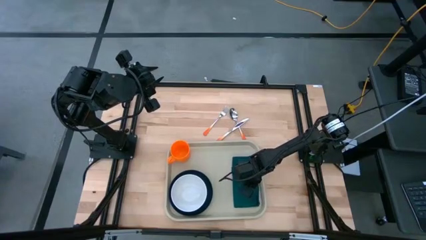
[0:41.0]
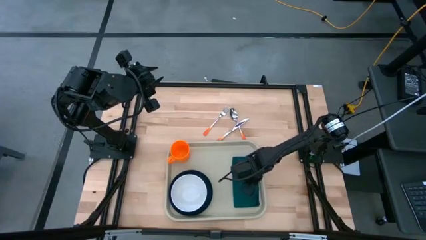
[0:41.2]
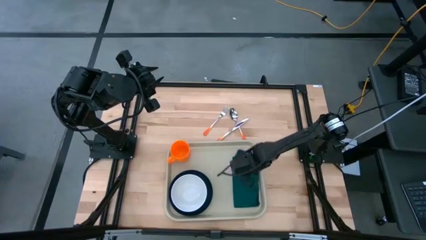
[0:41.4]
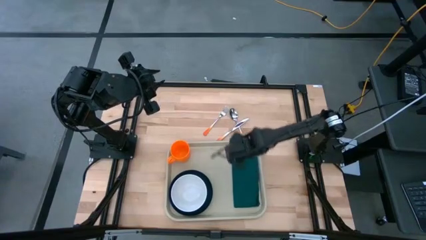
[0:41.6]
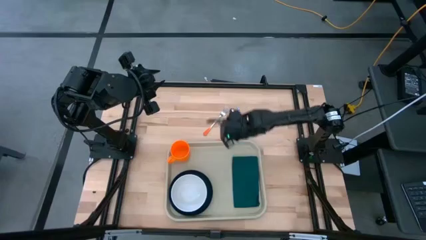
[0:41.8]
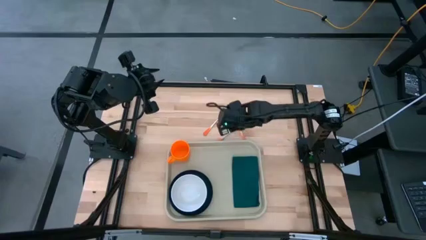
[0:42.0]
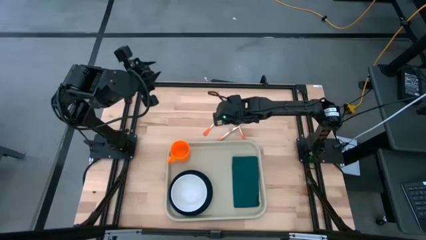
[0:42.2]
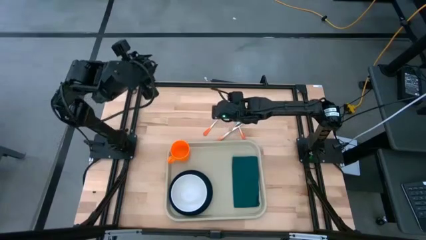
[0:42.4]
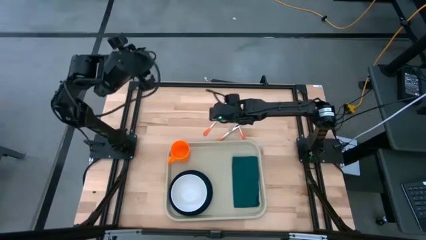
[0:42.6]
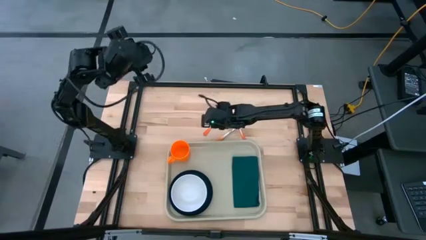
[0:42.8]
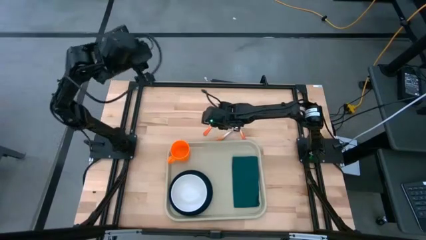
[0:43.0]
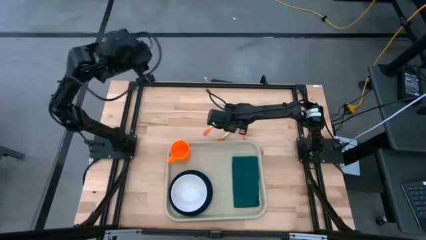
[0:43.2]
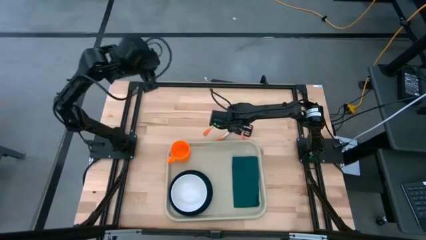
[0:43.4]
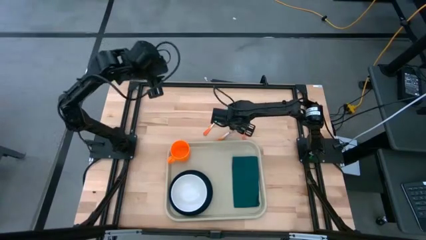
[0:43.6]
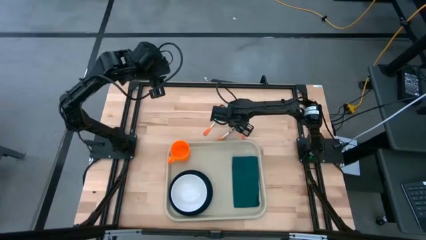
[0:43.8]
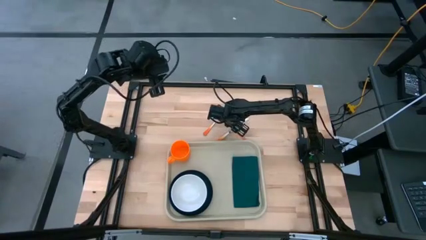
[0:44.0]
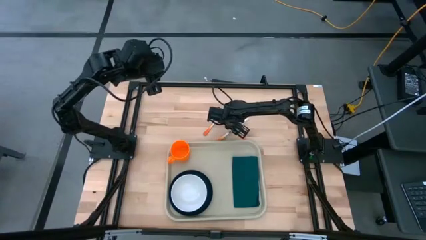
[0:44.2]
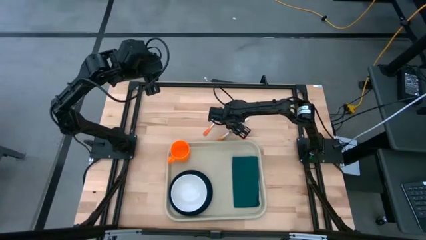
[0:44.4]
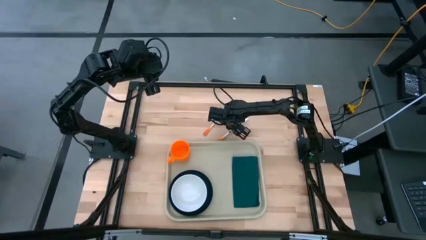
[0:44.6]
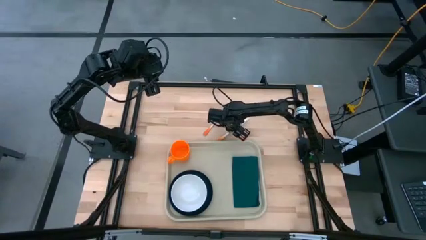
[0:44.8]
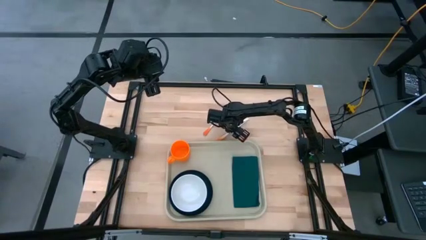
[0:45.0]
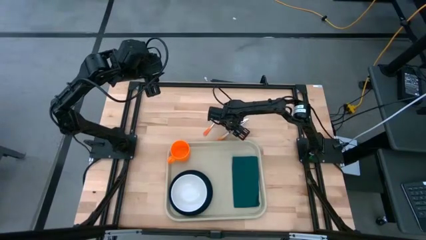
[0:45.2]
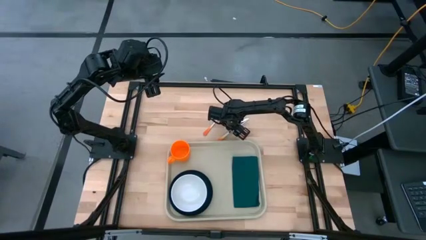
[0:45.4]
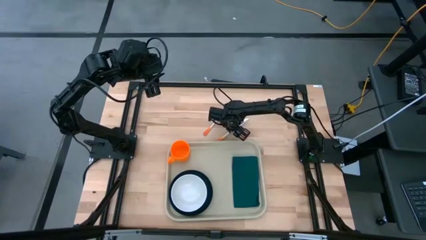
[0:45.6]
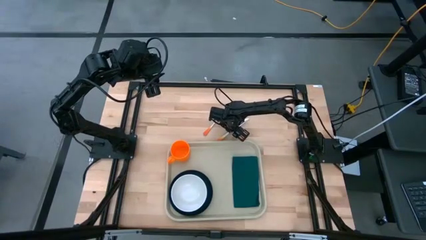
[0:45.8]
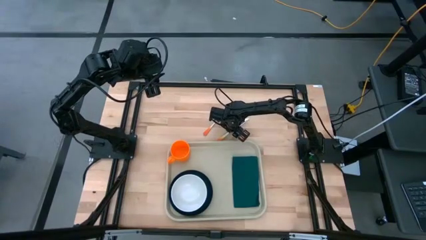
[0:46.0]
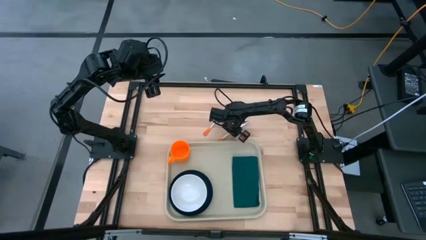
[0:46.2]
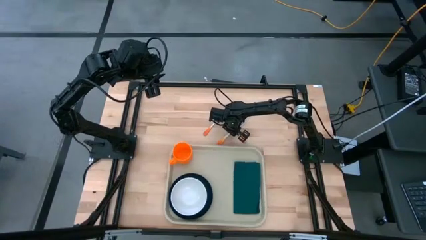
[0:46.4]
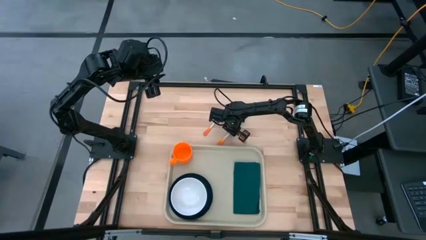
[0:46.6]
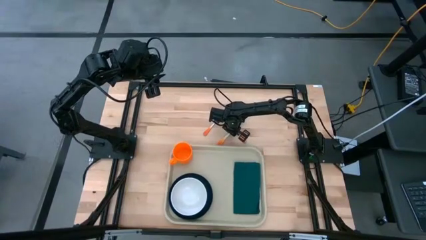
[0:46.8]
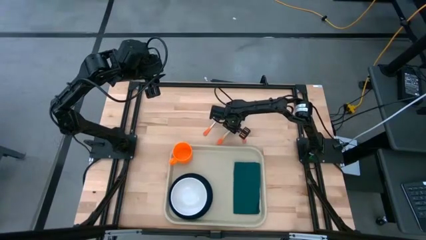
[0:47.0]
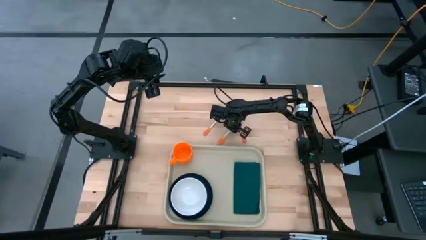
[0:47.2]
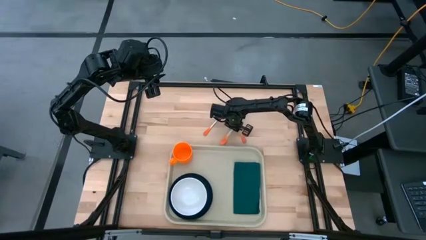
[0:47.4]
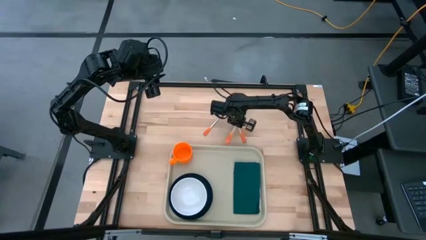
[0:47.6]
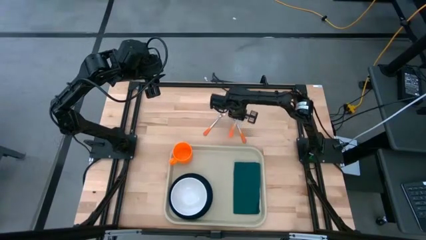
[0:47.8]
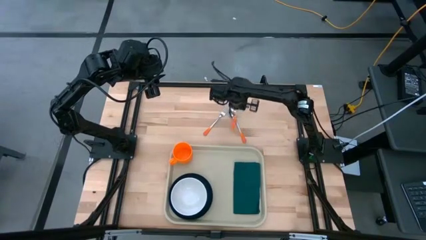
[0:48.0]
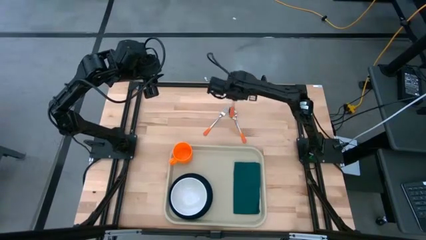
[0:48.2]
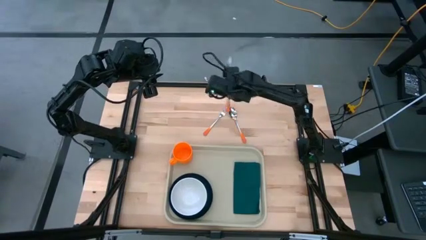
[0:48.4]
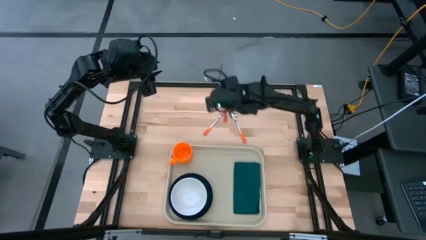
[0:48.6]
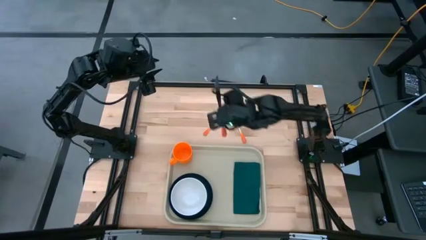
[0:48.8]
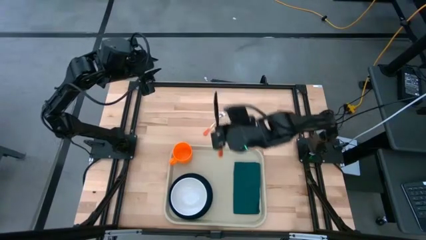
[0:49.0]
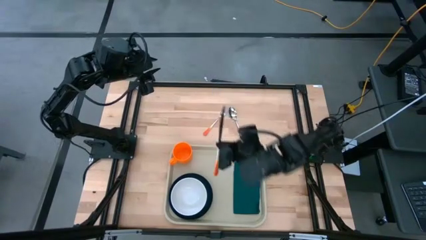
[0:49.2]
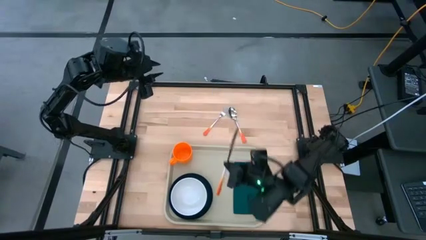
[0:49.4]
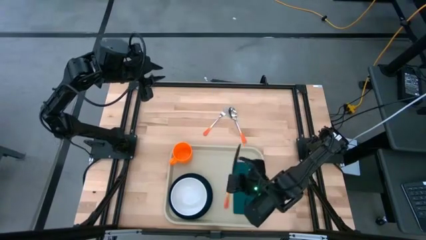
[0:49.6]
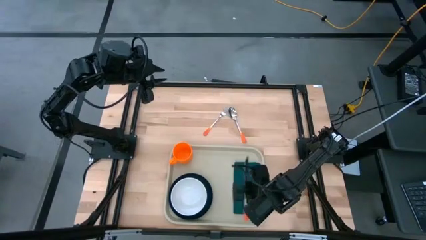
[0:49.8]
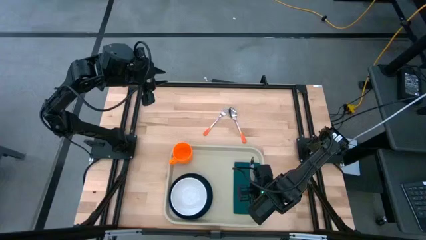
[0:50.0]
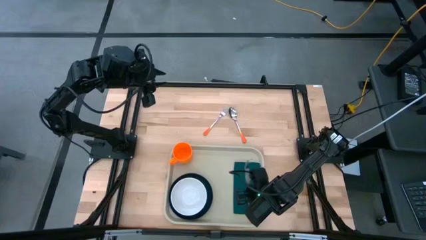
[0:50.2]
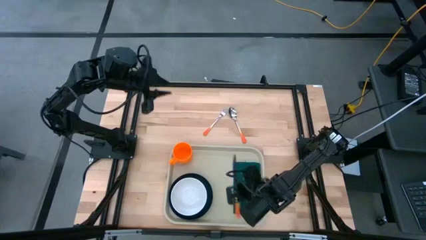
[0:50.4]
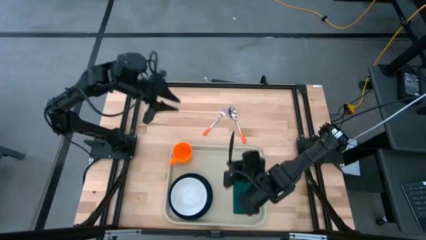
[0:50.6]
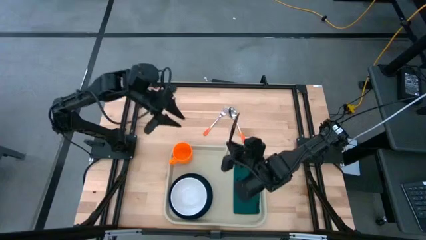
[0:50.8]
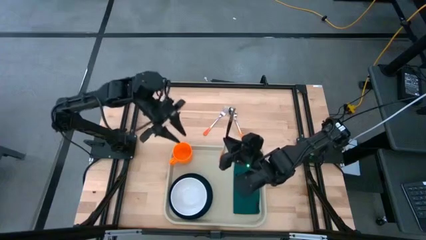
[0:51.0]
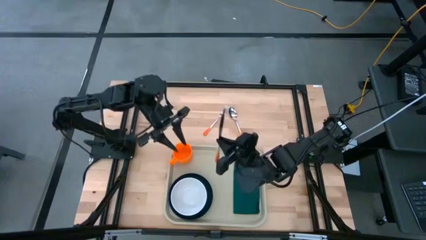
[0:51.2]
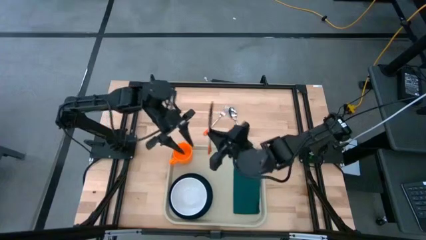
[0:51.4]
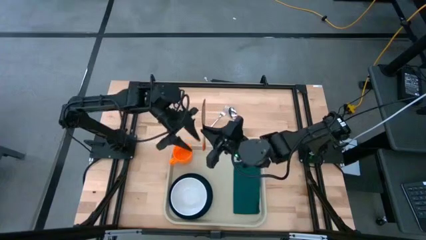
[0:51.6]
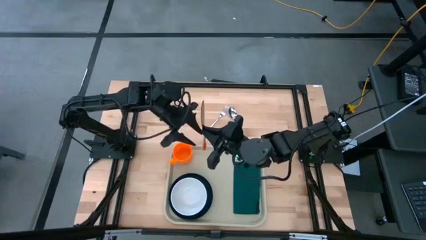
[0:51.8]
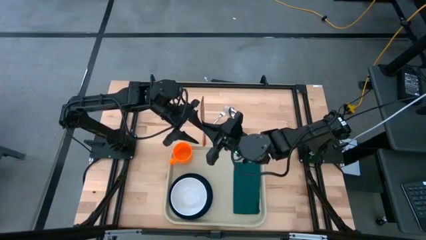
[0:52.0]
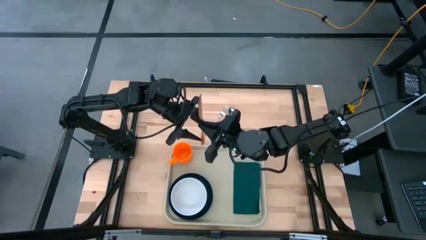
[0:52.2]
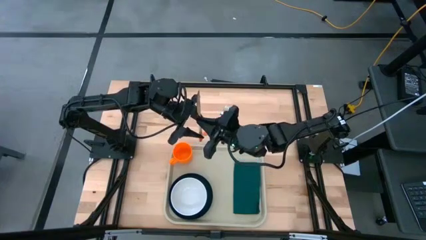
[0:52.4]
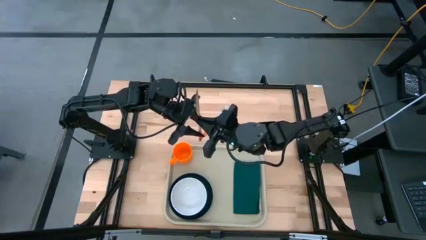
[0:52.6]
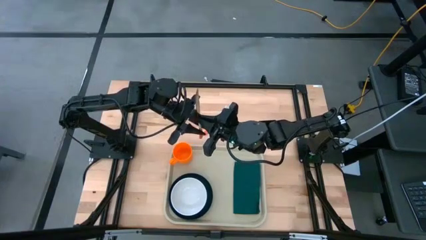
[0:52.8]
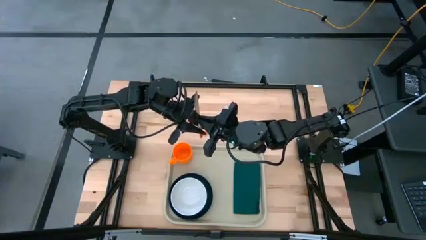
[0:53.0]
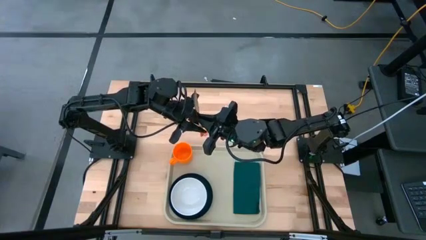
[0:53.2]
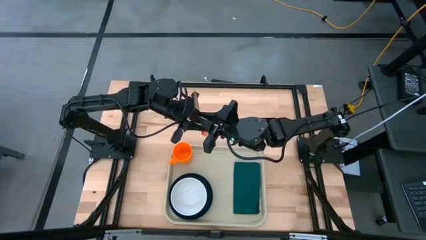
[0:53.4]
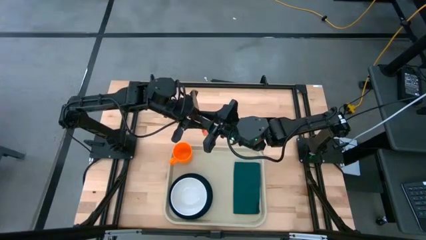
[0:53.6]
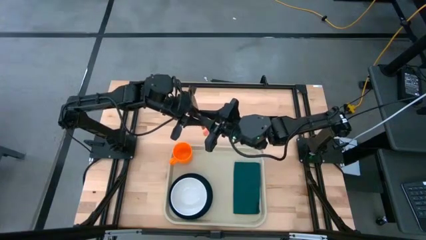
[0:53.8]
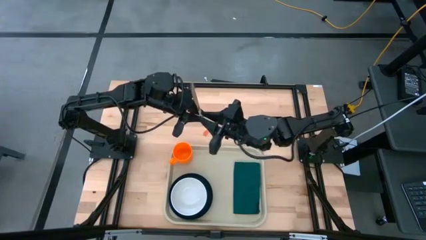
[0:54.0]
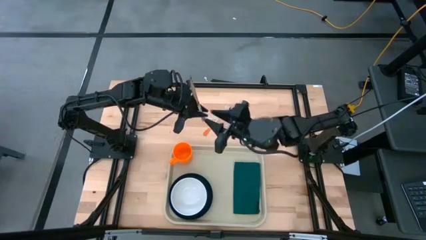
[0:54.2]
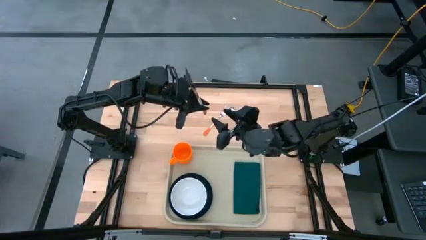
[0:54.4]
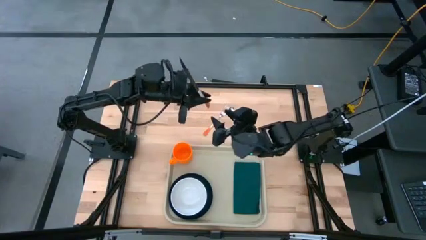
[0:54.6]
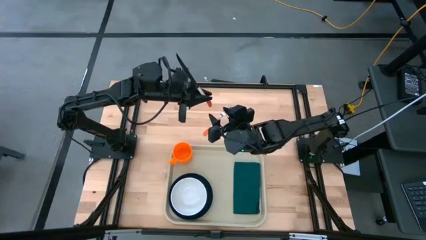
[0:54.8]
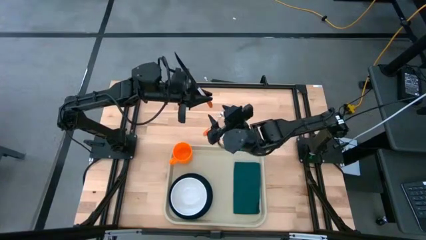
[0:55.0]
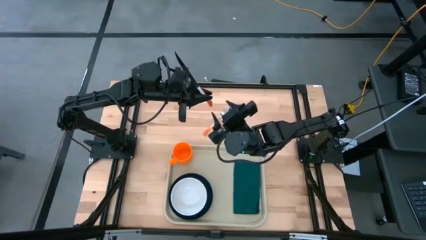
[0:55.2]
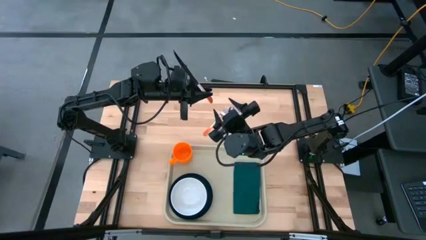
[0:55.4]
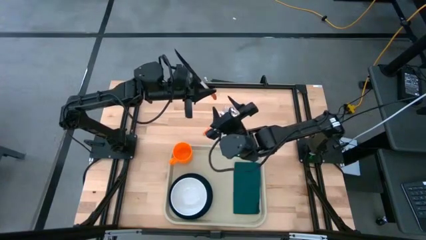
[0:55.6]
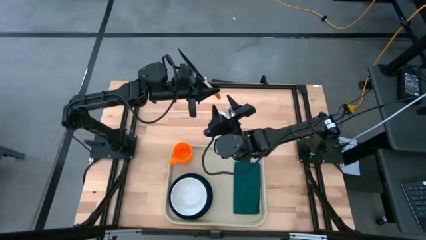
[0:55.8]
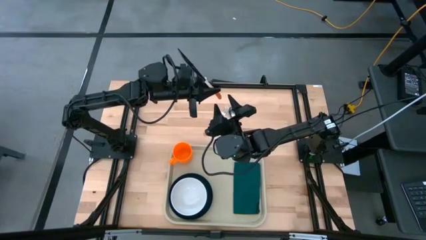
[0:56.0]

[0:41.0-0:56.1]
Task: Set up tray
Put the orange knife on the green napkin
